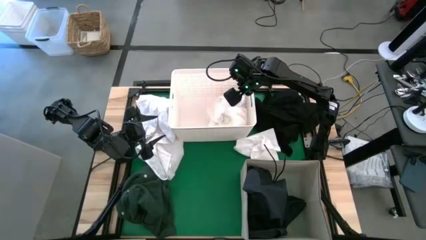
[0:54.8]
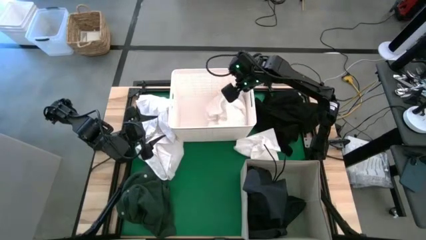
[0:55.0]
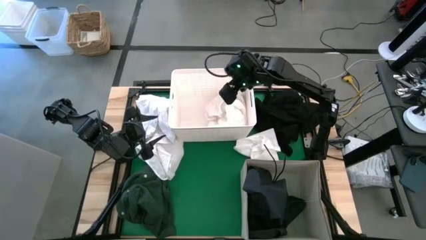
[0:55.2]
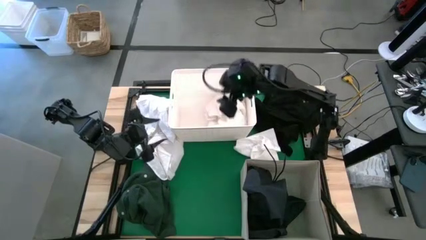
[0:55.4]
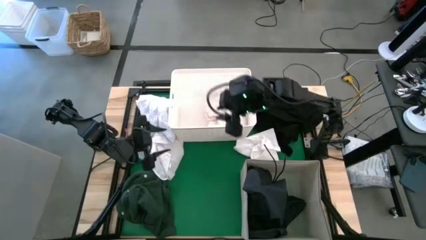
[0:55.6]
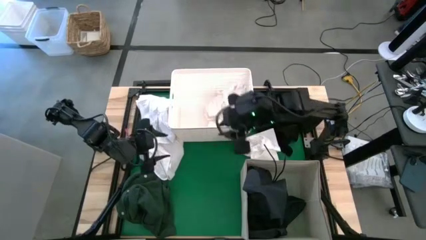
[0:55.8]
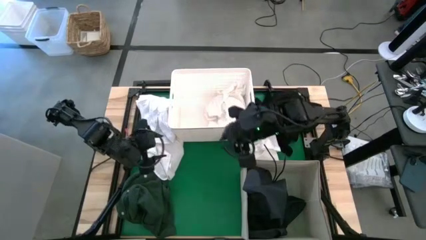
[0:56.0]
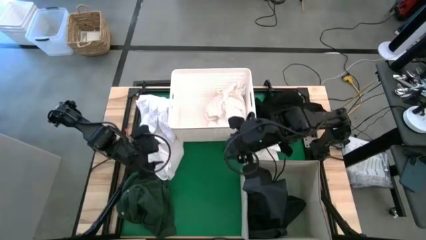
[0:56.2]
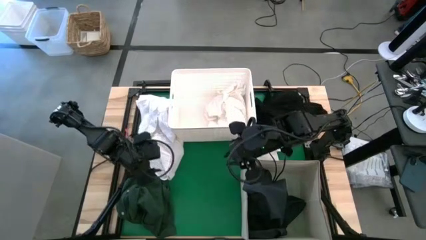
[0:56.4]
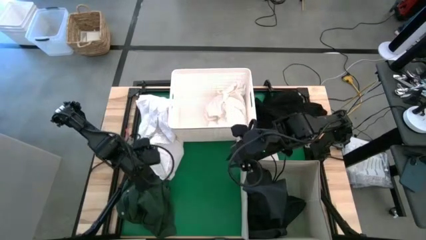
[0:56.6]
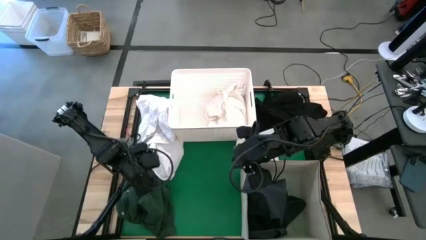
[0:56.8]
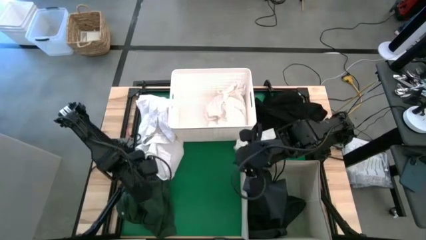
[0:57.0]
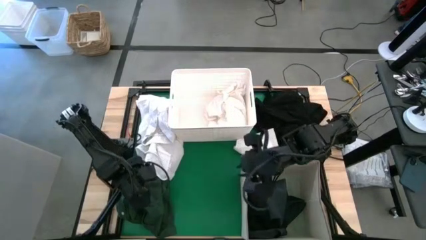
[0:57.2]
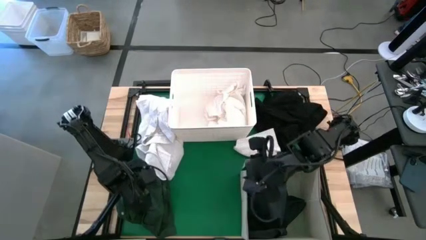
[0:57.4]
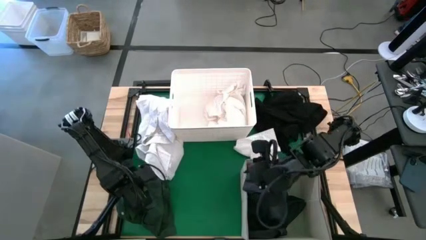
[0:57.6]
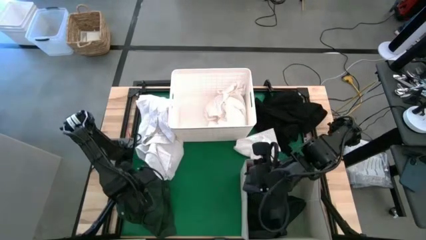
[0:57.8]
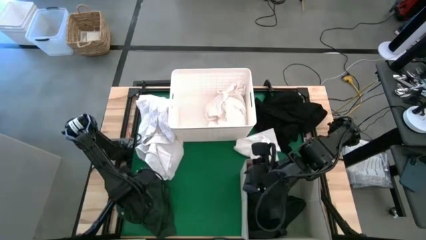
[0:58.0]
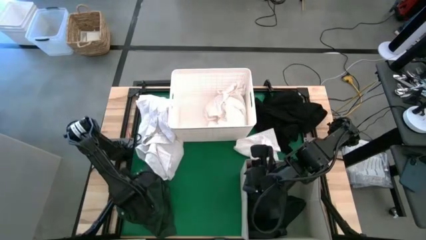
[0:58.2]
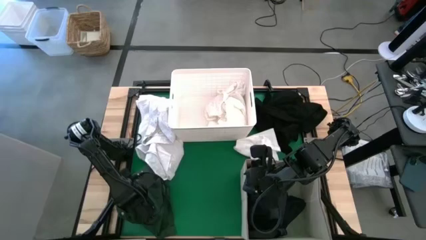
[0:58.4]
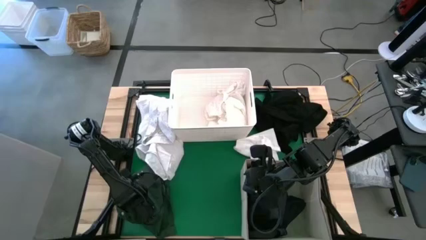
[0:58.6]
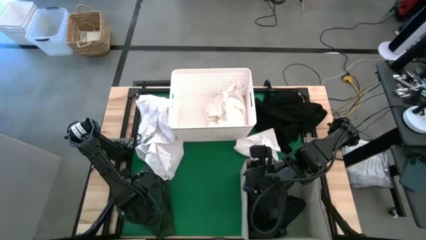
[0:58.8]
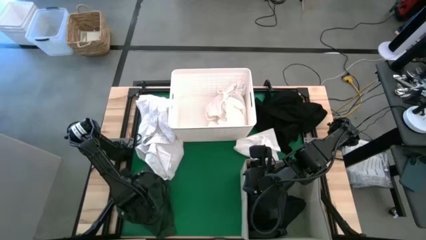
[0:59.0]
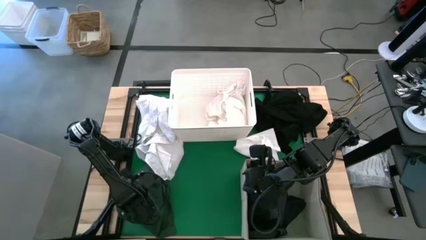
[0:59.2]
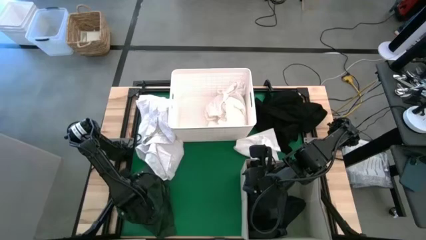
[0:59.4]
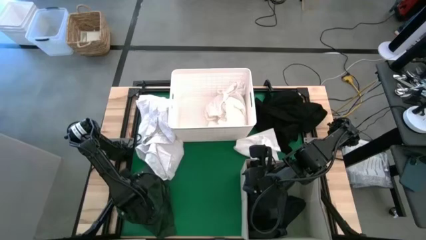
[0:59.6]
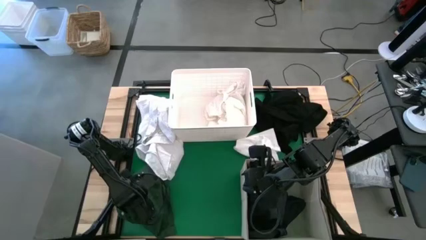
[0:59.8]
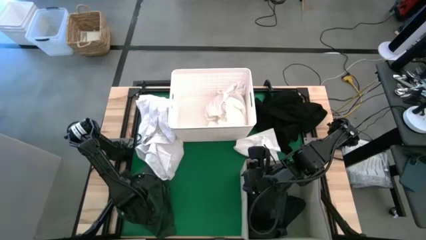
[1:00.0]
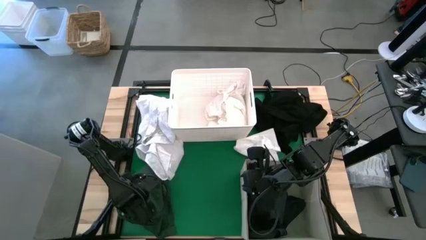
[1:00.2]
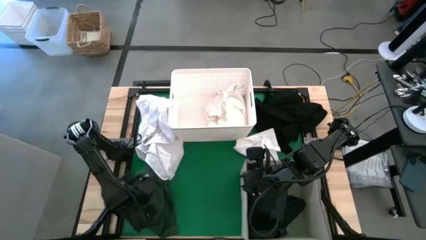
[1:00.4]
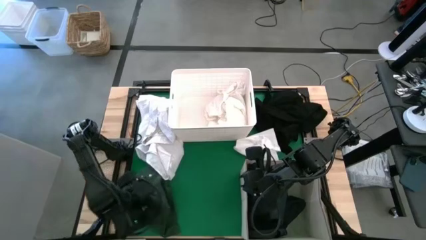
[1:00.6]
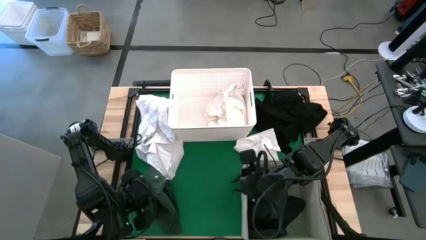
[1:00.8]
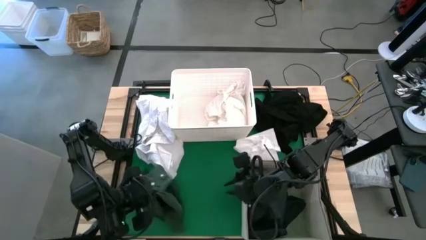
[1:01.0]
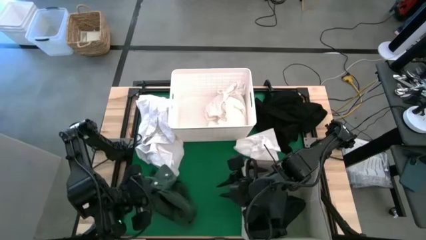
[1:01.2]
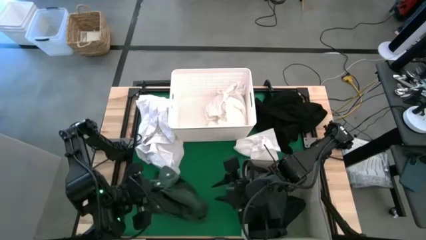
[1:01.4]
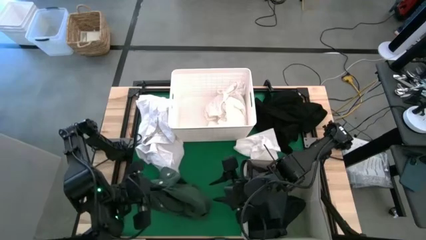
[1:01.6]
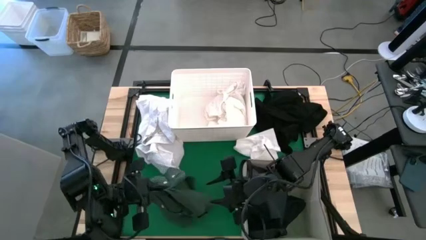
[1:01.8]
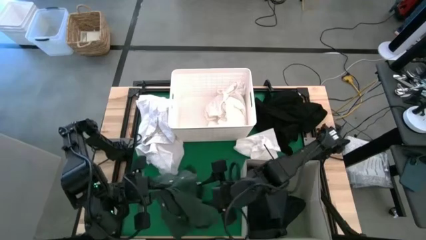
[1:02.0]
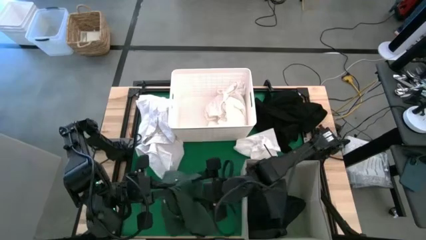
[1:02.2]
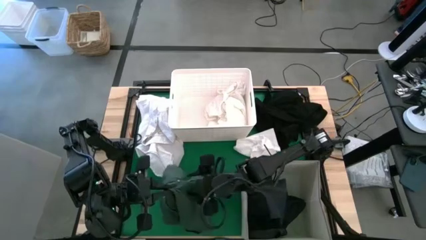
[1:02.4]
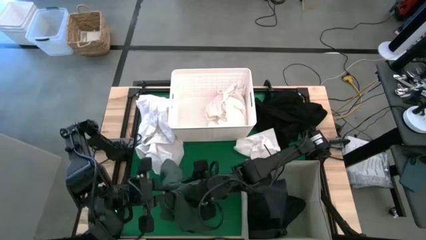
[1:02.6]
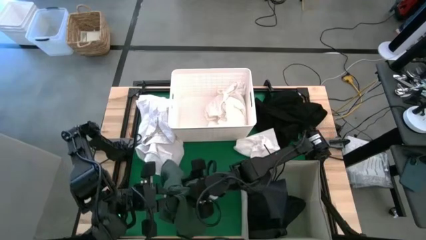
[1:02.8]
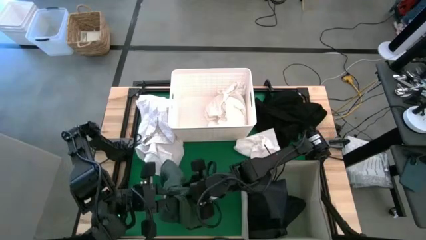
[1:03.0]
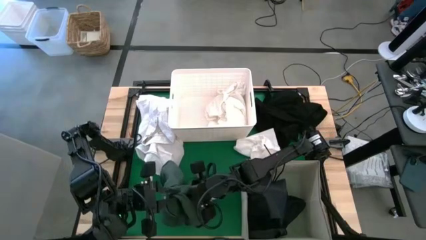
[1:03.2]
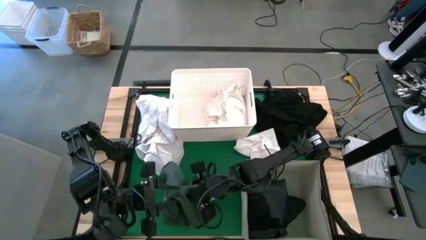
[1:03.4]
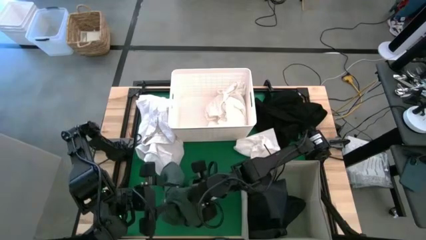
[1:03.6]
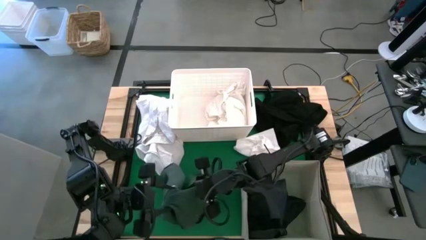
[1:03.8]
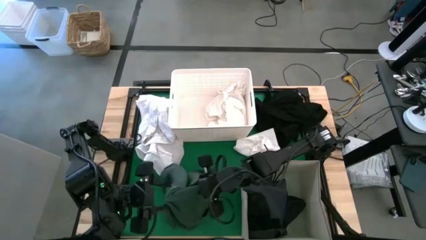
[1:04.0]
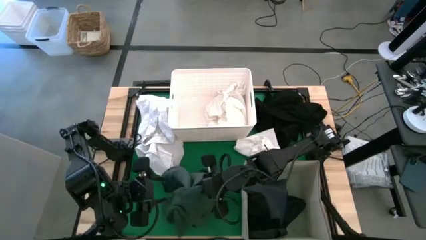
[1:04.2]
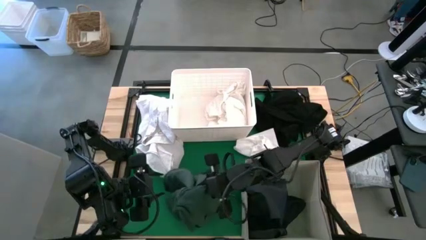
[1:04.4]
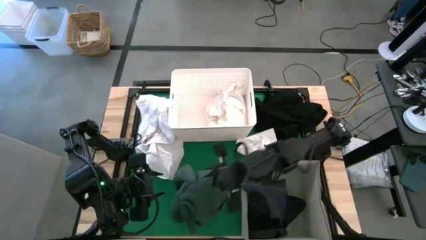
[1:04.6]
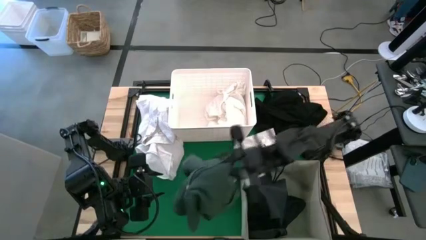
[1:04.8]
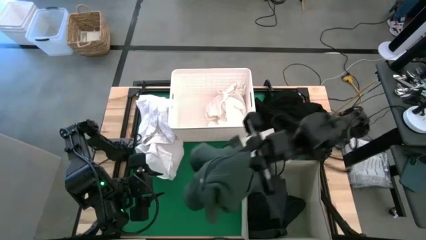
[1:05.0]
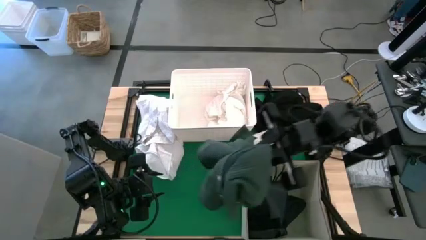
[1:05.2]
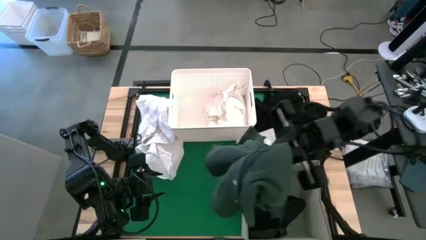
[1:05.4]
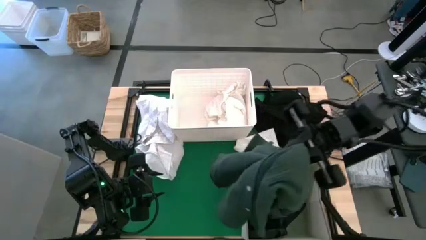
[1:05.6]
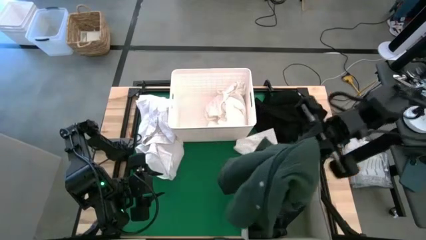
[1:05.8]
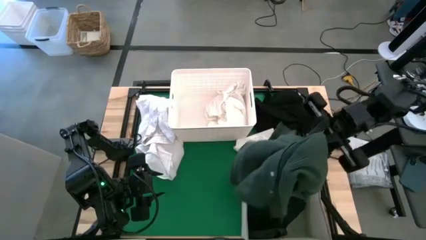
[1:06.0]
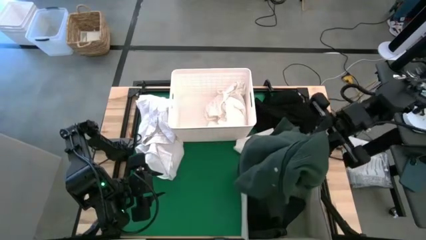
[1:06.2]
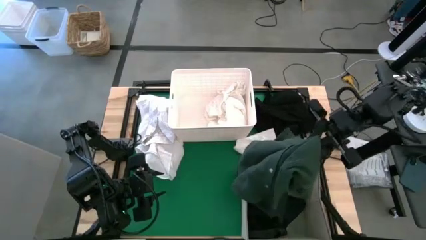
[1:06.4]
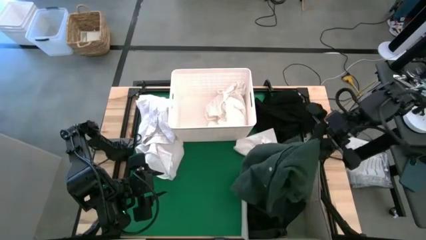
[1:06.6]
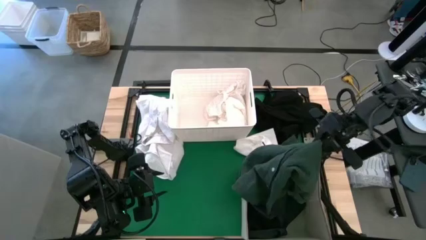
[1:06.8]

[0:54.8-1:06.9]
Put the green cloth into the white fabric storage bin
